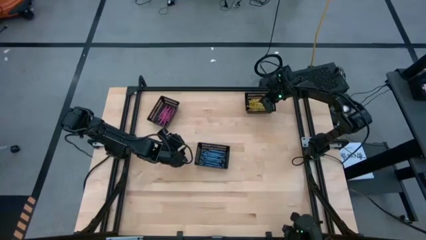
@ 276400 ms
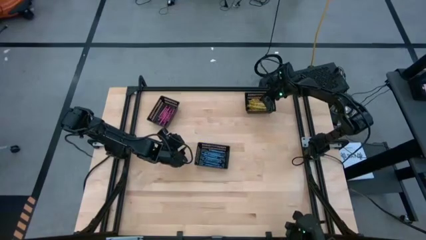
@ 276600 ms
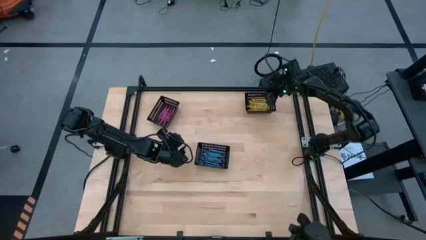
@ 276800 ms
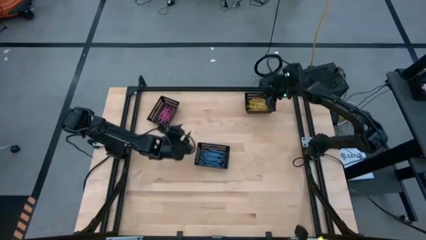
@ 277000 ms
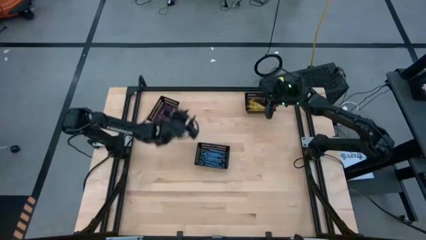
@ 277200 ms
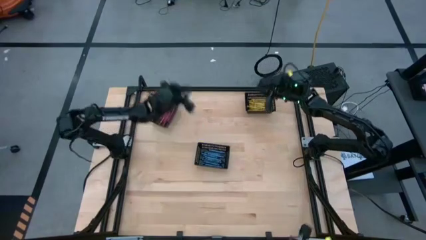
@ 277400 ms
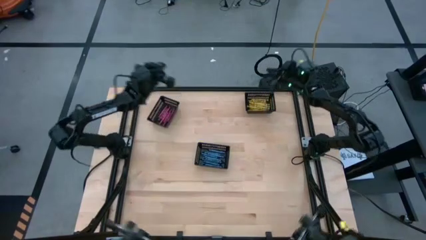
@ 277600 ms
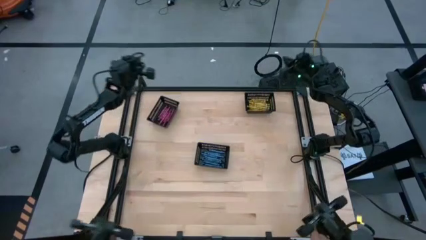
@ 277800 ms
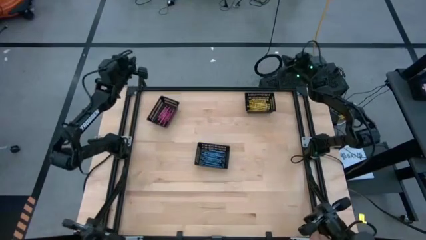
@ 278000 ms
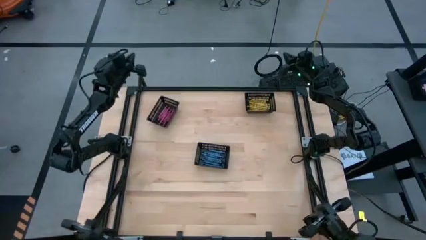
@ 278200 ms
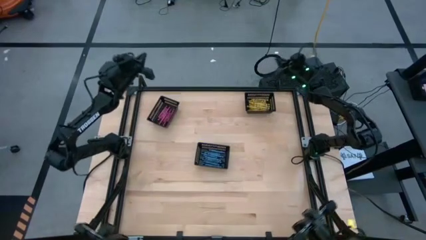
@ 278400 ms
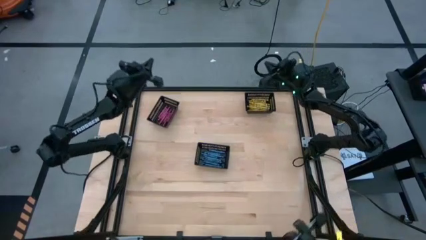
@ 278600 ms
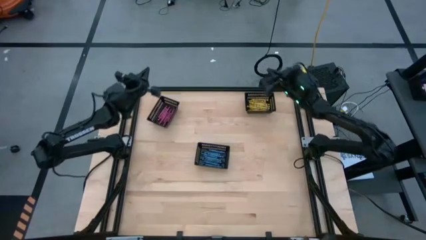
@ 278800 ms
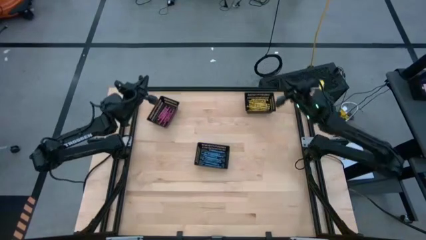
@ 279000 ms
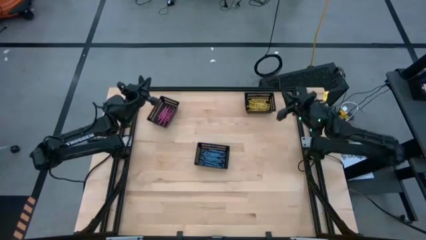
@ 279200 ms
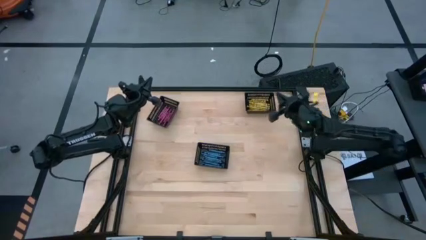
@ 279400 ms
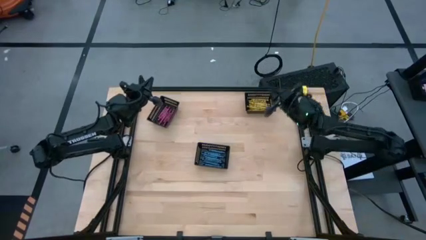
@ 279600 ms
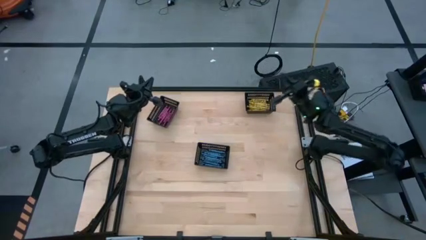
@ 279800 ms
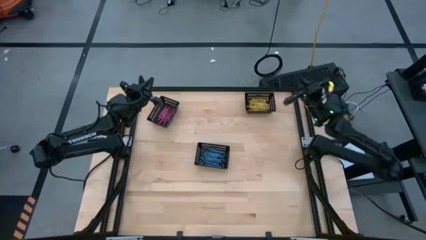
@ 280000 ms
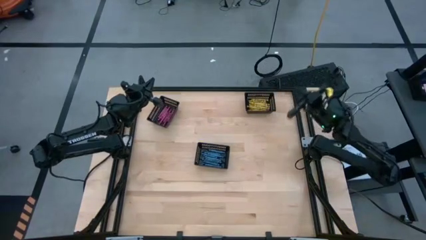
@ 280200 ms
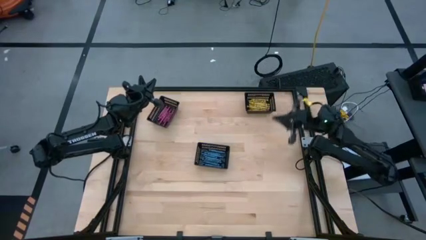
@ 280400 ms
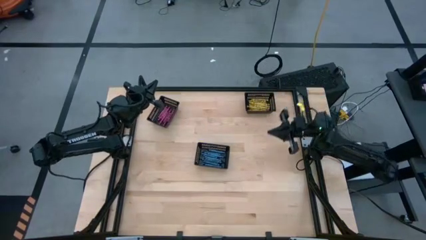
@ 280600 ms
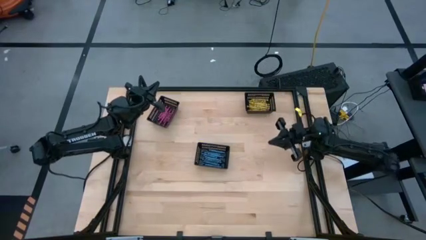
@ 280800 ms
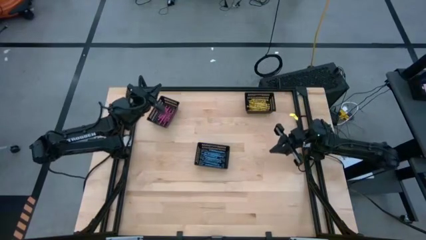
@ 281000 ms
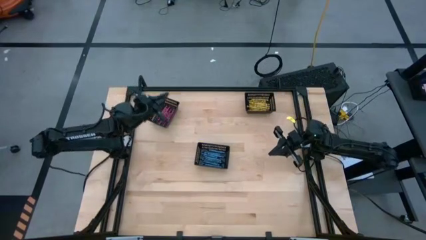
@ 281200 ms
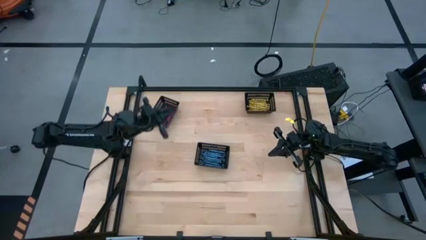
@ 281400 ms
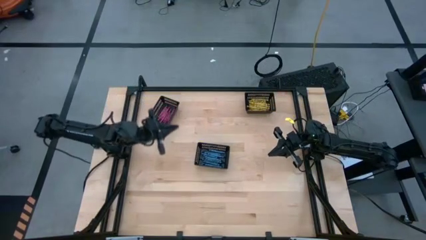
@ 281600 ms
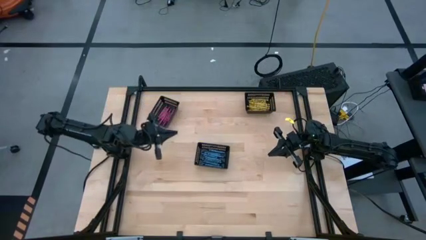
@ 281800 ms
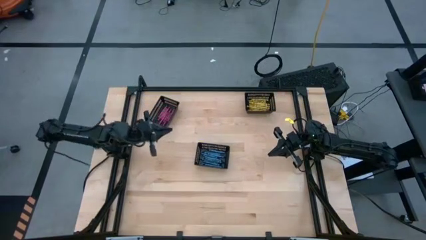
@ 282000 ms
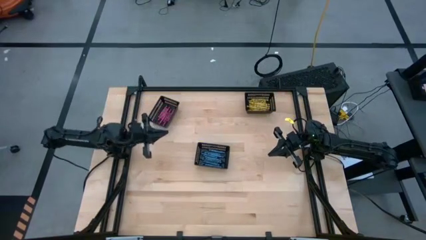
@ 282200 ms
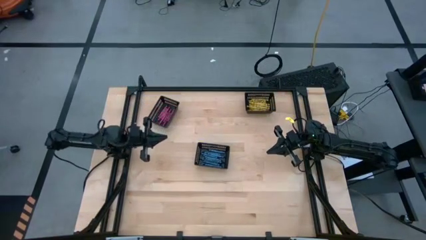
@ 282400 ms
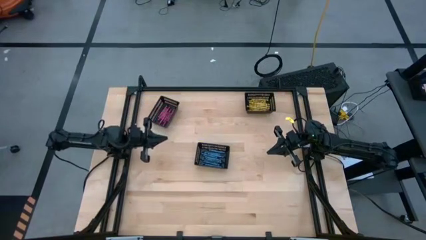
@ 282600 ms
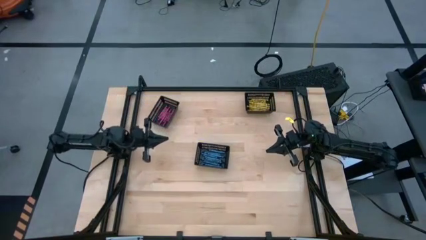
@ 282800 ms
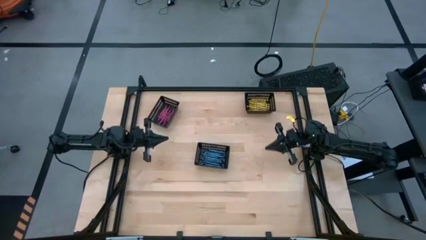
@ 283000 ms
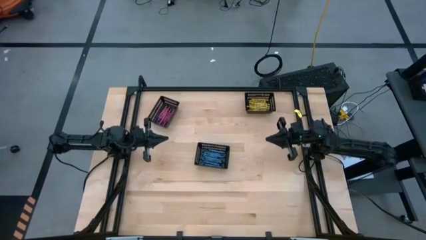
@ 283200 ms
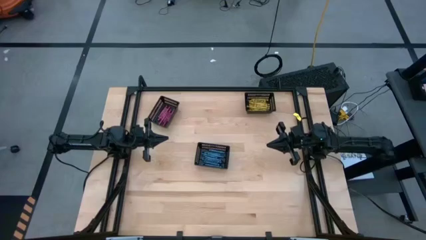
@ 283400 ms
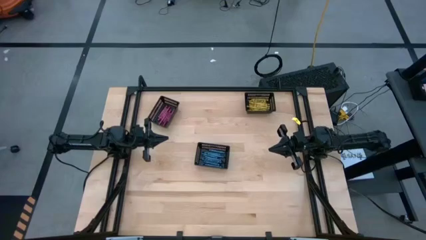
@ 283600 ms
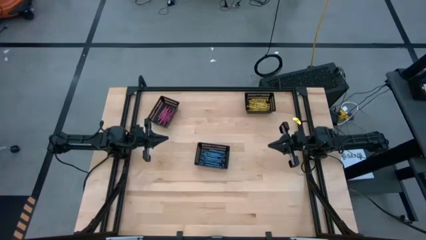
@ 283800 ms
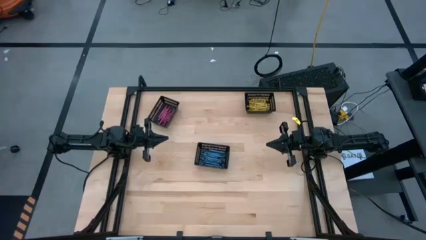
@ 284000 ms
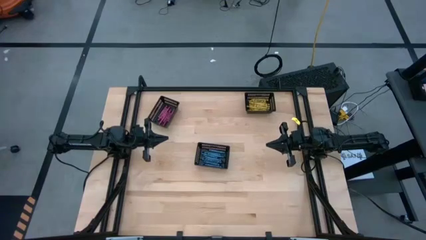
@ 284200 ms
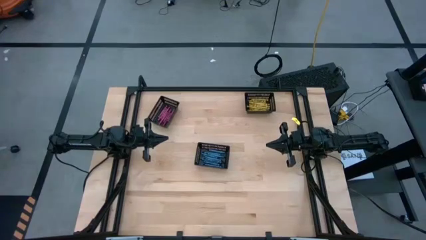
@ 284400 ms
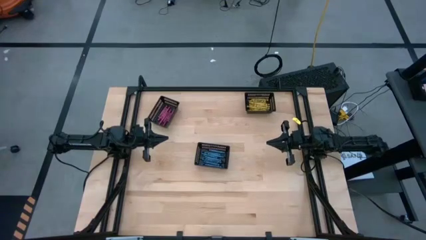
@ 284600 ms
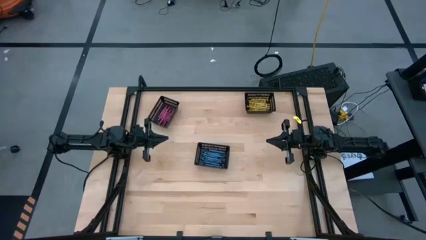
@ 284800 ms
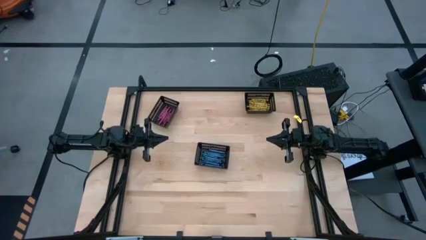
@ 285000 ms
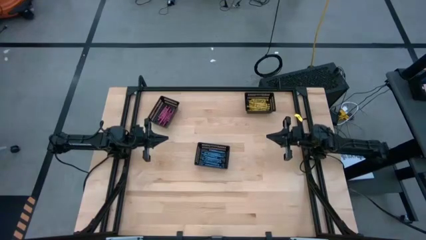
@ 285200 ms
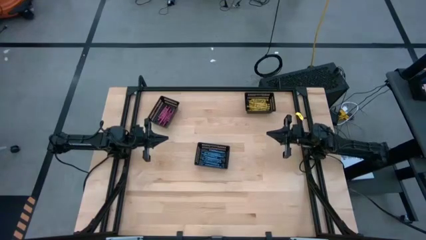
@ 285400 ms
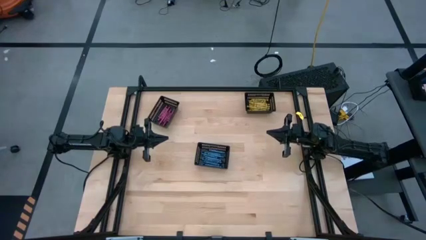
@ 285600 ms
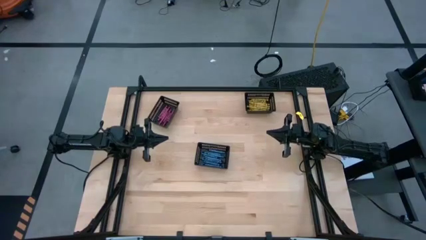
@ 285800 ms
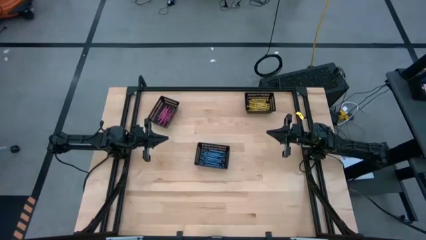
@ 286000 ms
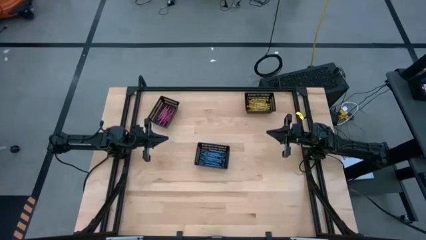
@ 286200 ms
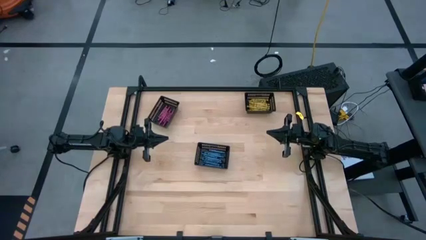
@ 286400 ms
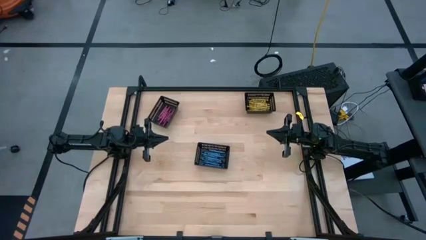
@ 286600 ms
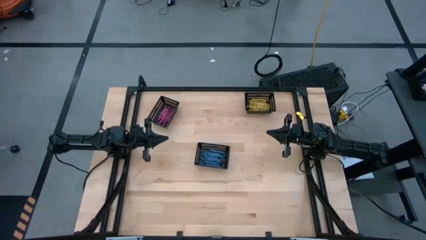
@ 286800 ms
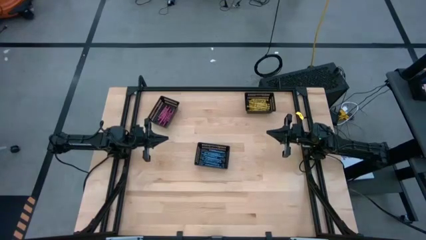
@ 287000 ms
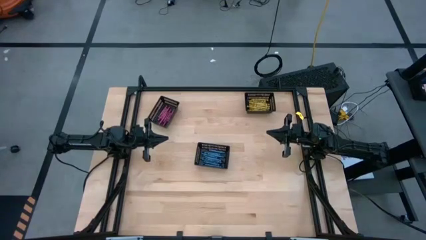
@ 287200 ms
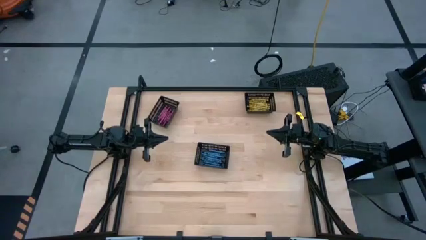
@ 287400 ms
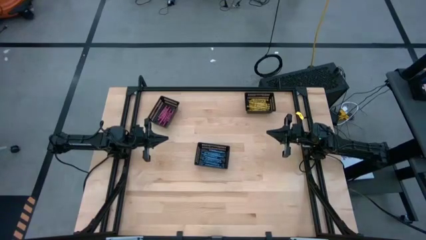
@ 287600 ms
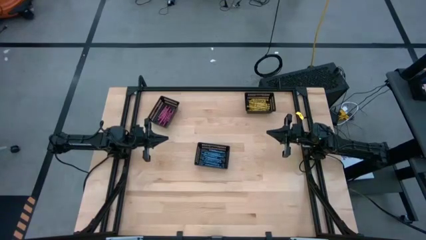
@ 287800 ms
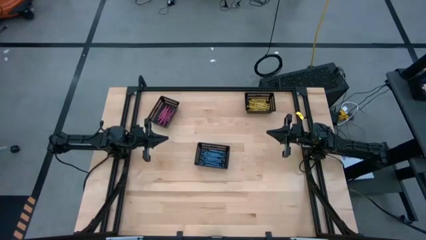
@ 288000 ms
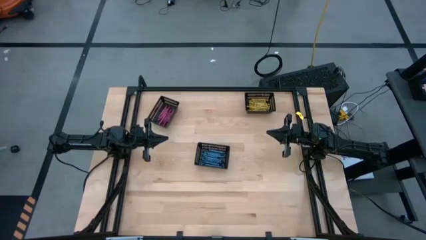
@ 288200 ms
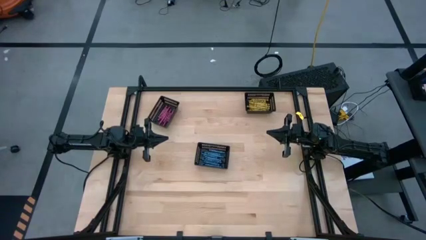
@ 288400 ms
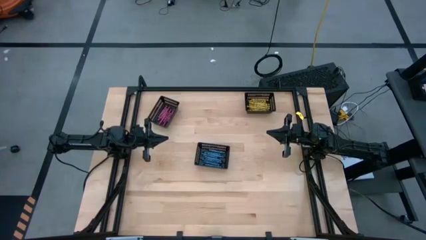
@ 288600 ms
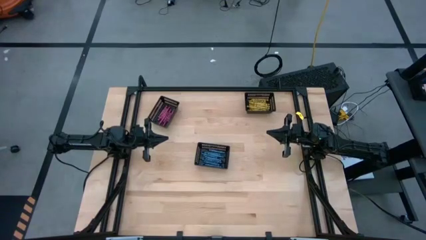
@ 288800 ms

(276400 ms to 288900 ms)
Task: Sort crayons
Return to Home Position
